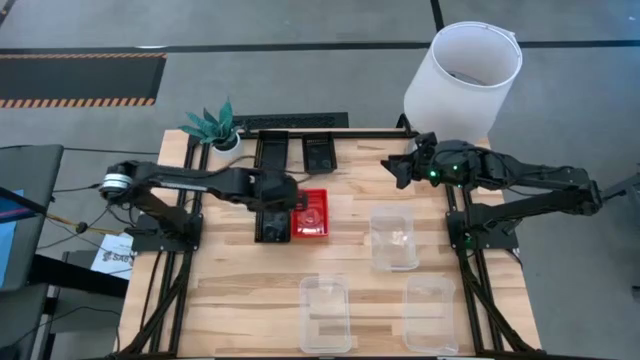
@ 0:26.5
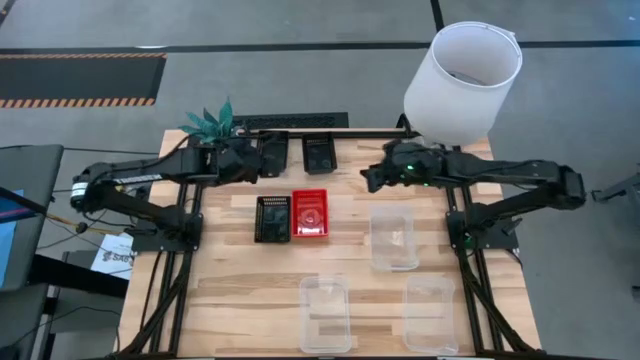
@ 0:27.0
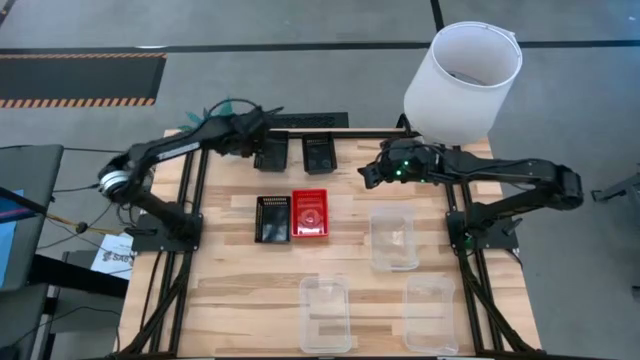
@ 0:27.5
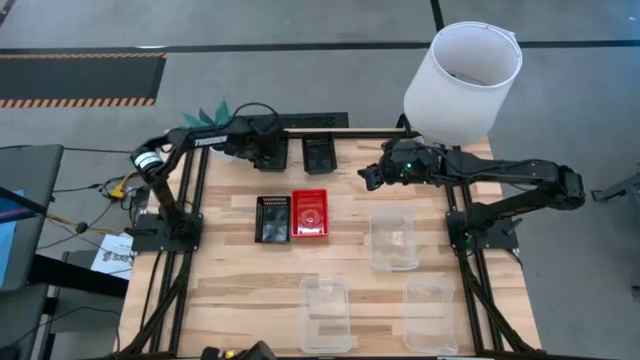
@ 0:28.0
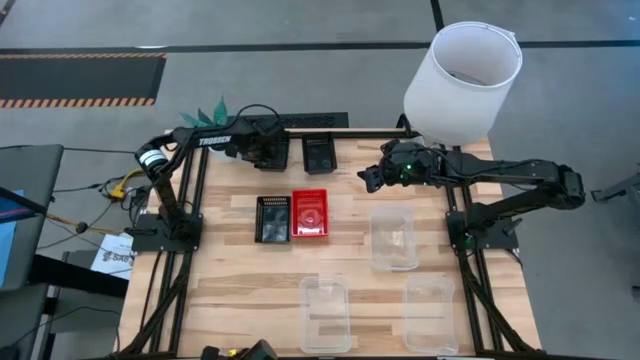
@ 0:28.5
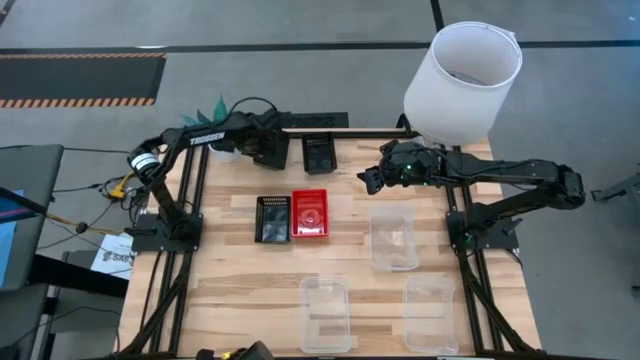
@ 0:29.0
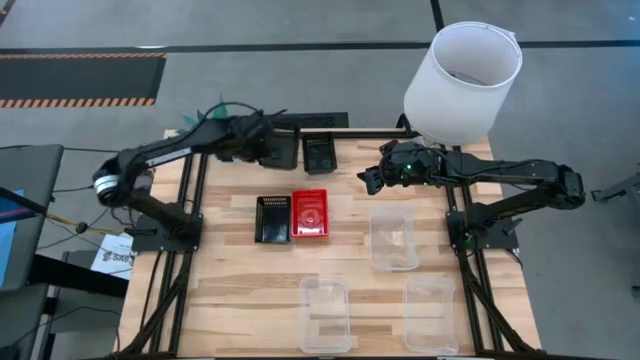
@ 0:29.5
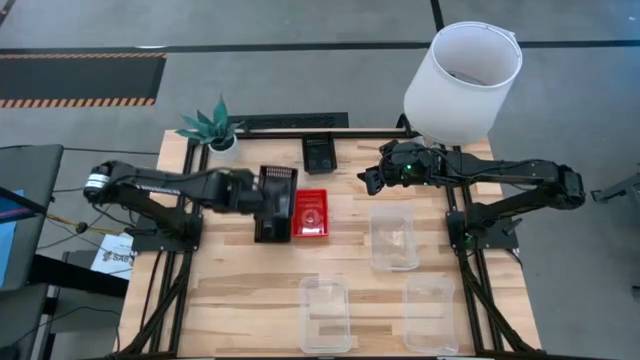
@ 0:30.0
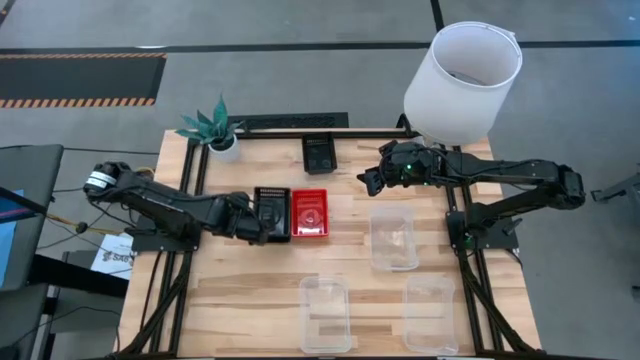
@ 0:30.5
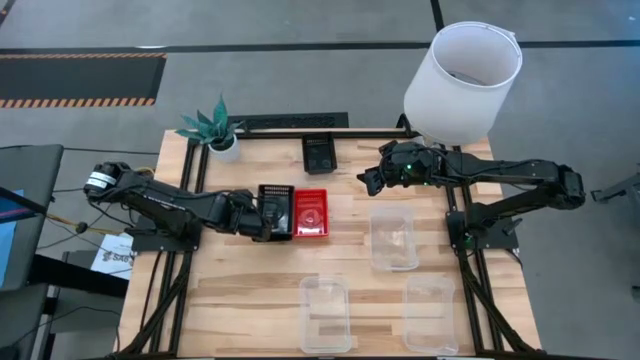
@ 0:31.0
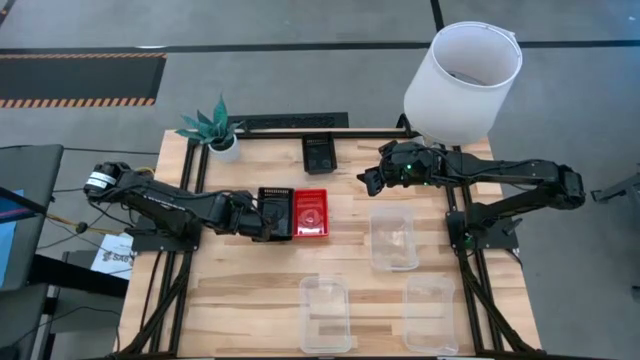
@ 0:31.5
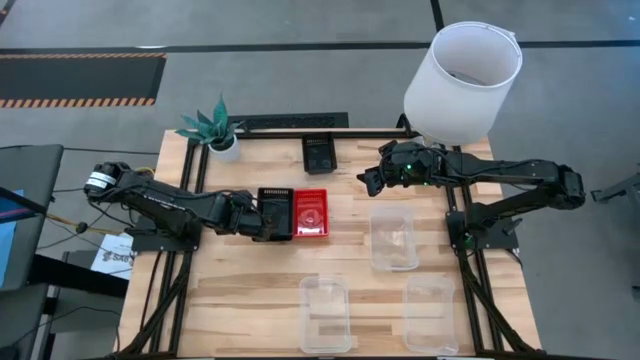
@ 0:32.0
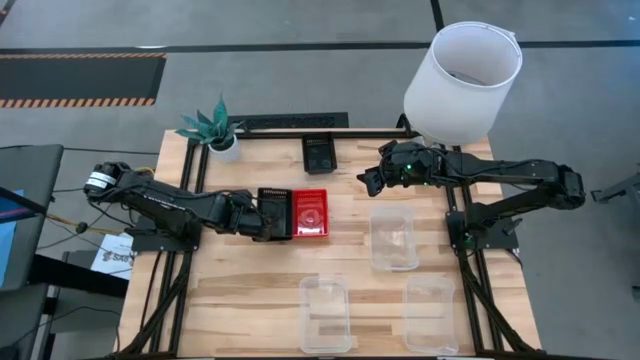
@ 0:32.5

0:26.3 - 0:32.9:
Stack the top left black bin on top of the bottom black bin

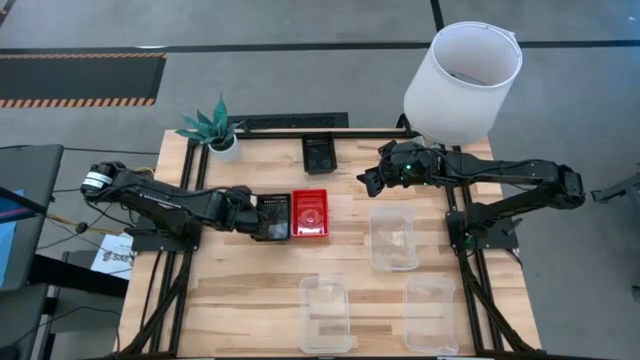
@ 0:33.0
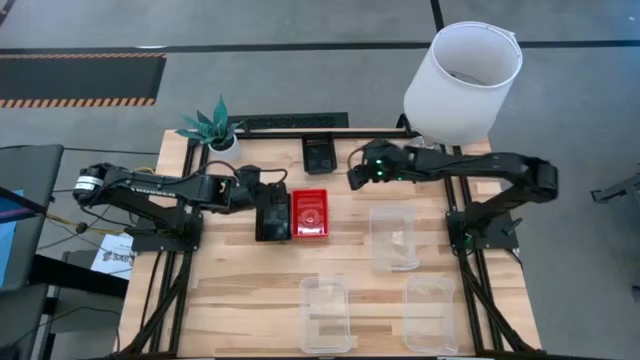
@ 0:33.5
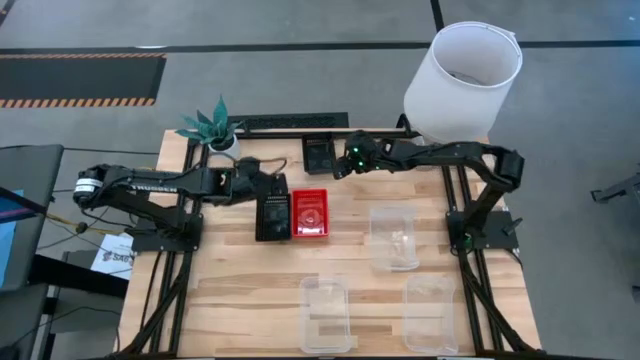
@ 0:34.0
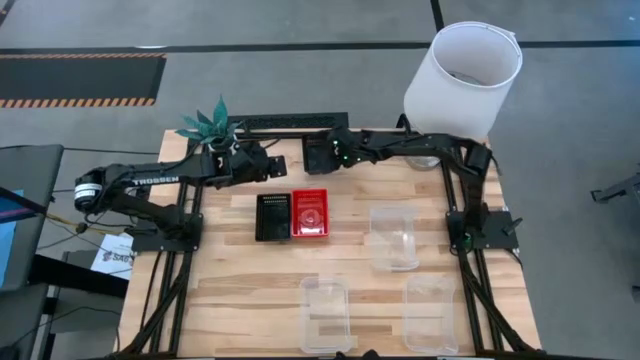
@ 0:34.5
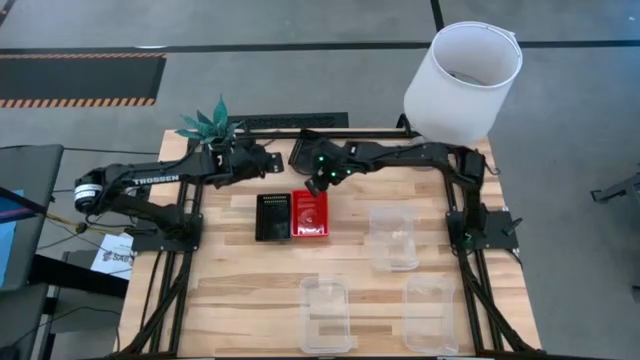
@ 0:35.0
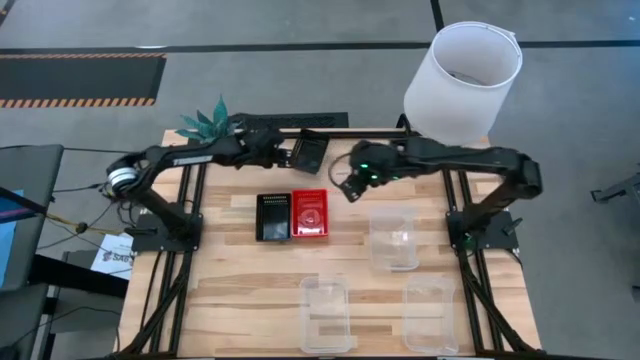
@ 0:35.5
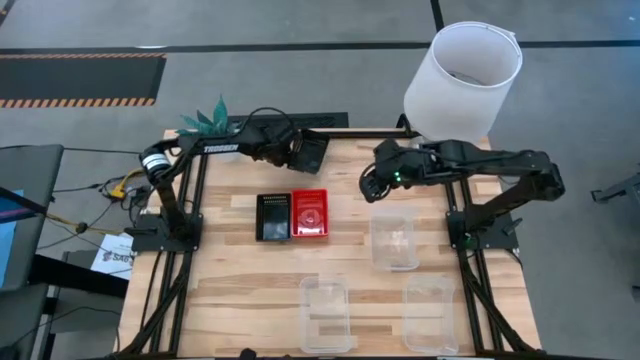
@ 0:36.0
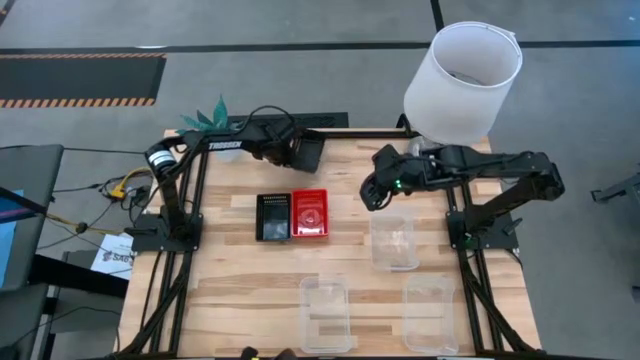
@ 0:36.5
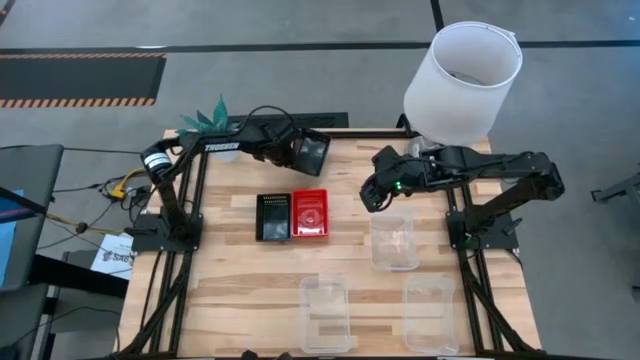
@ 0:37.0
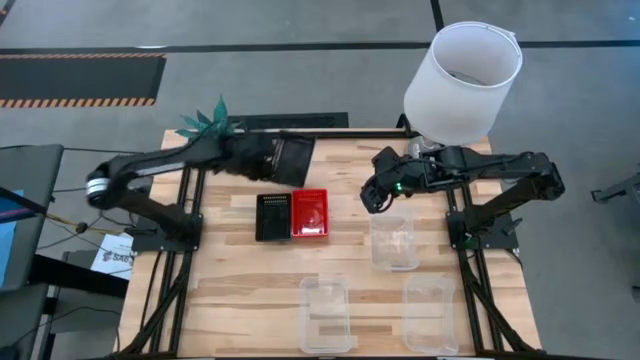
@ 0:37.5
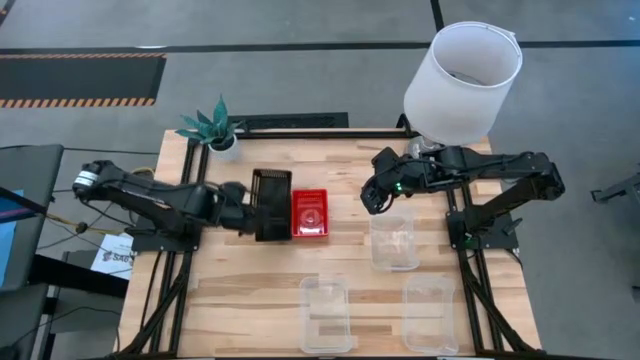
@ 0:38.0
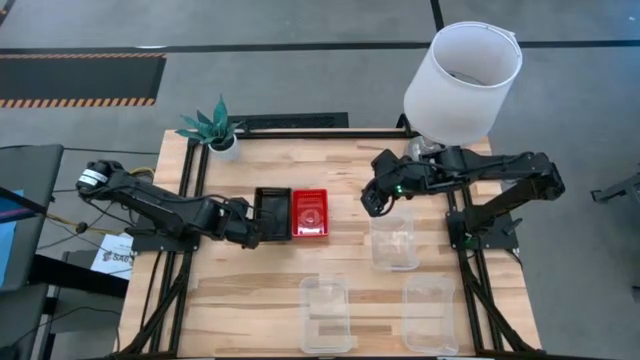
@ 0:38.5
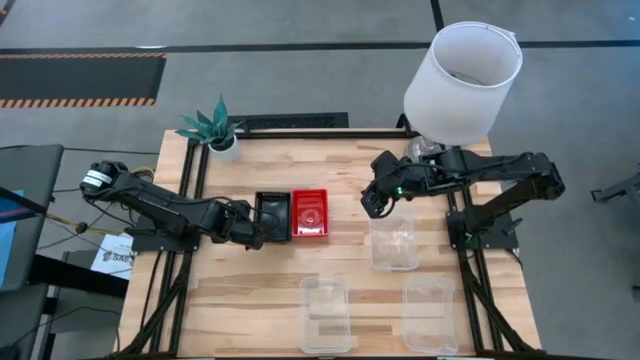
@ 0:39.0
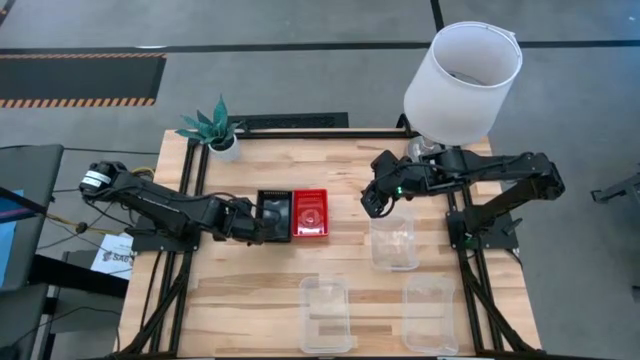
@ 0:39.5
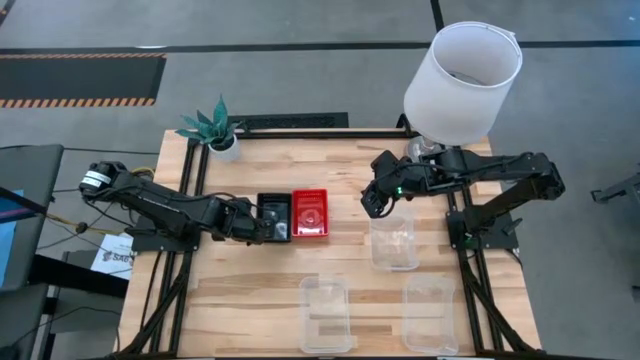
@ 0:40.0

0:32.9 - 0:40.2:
Stack the black bin on top of the bottom black bin

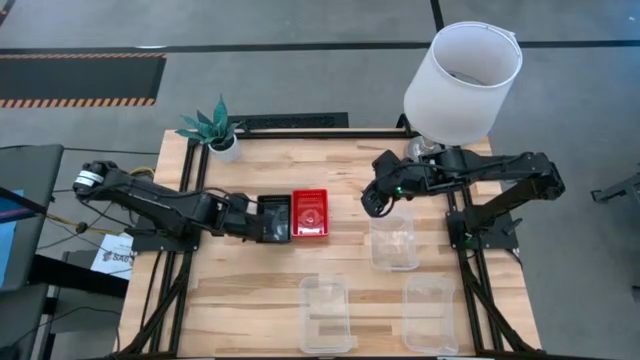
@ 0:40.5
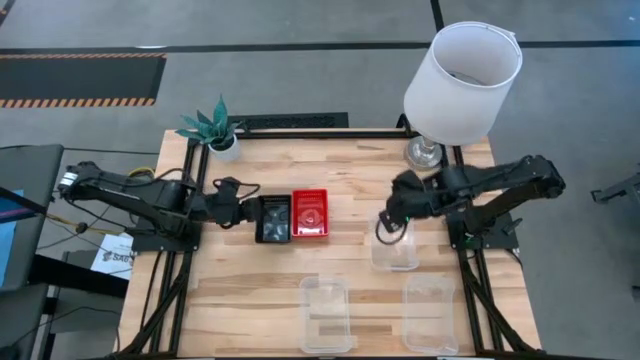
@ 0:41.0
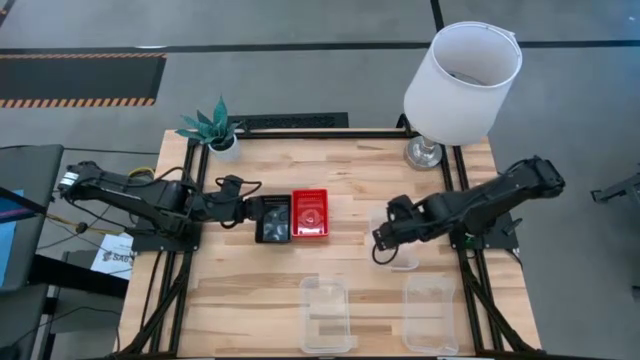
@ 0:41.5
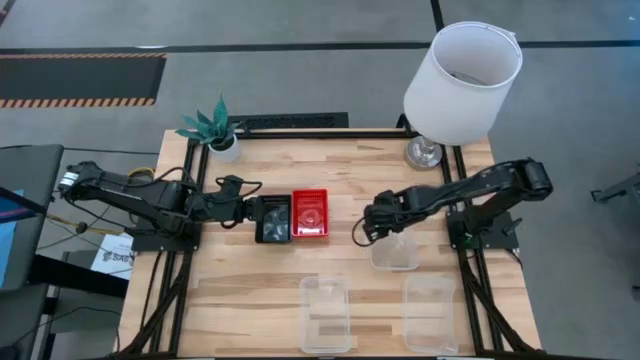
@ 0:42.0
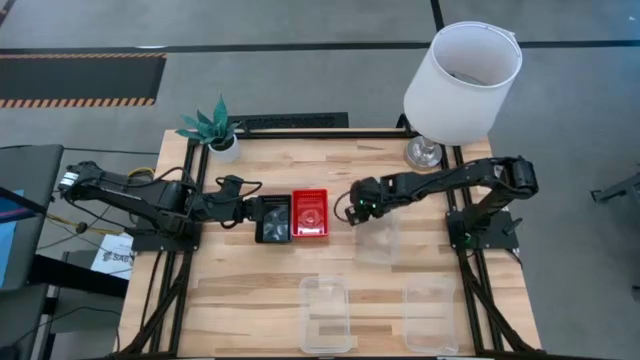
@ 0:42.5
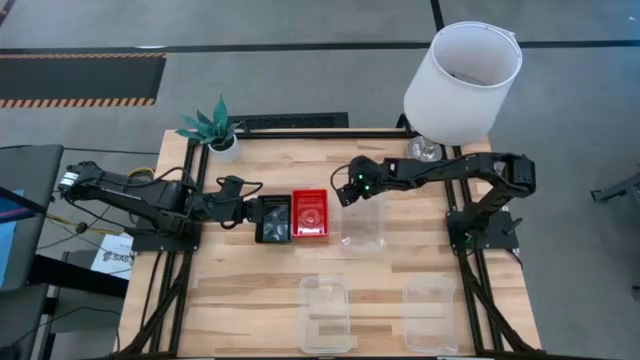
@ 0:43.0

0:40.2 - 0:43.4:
Move the top transparent bin to the center of the table
